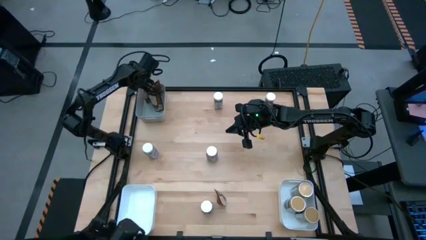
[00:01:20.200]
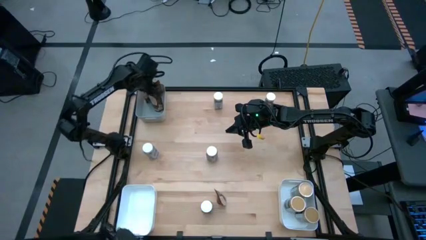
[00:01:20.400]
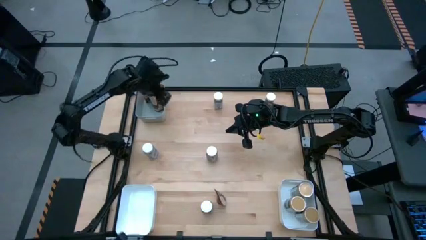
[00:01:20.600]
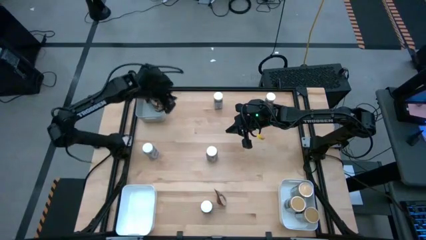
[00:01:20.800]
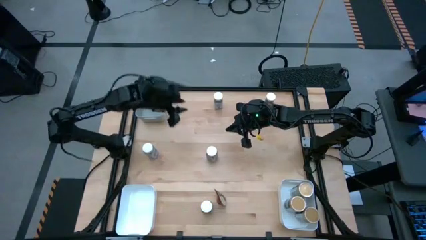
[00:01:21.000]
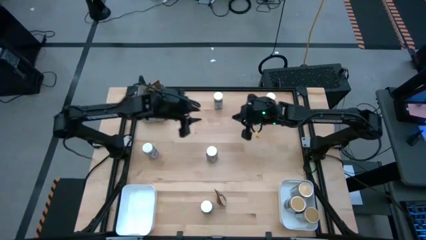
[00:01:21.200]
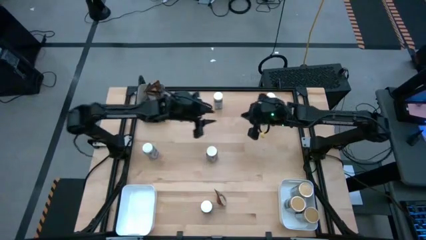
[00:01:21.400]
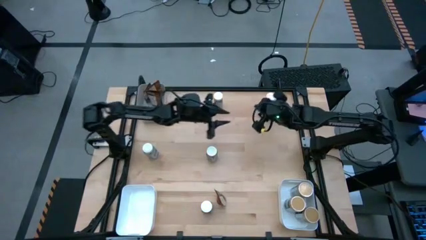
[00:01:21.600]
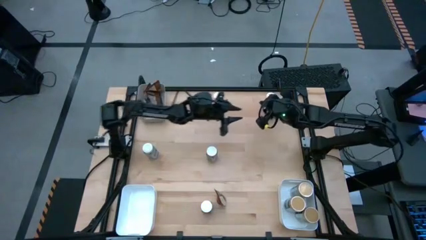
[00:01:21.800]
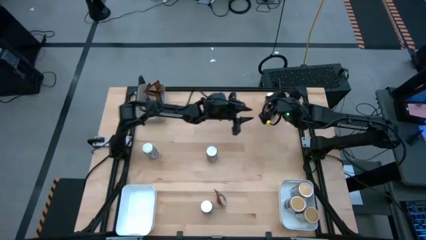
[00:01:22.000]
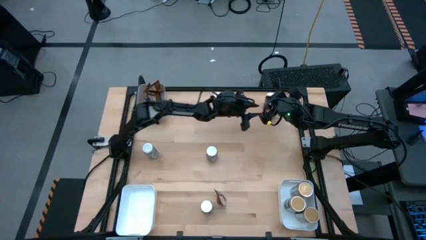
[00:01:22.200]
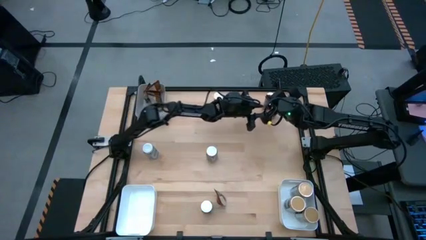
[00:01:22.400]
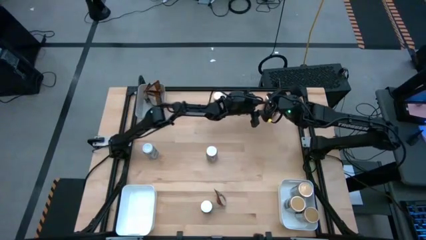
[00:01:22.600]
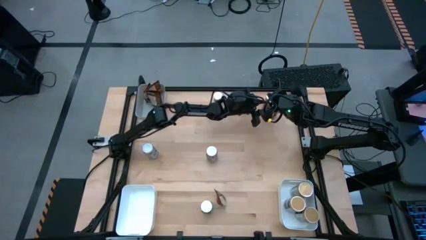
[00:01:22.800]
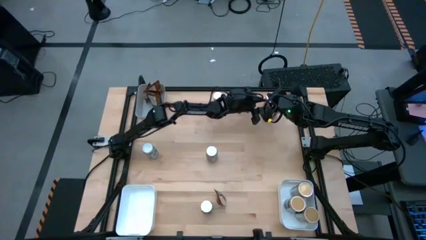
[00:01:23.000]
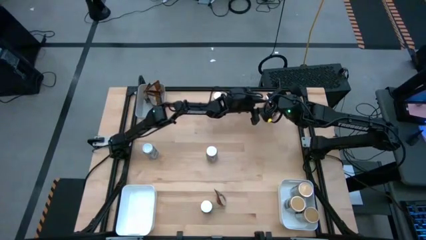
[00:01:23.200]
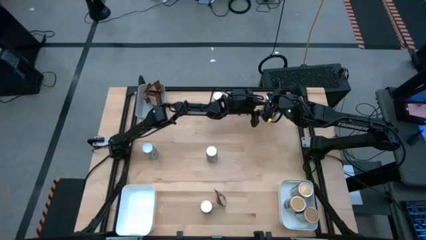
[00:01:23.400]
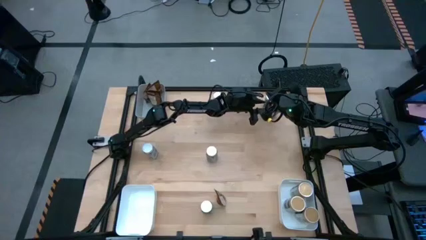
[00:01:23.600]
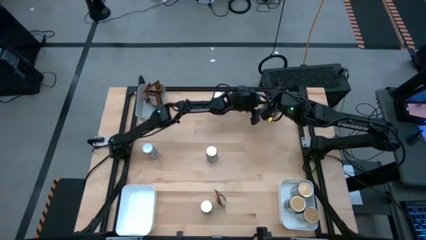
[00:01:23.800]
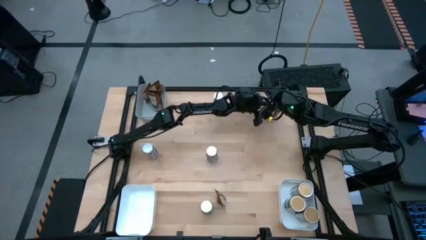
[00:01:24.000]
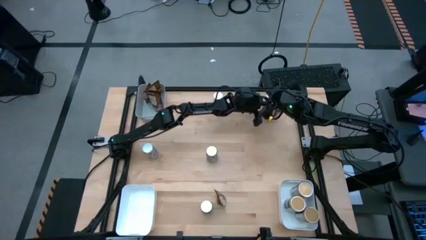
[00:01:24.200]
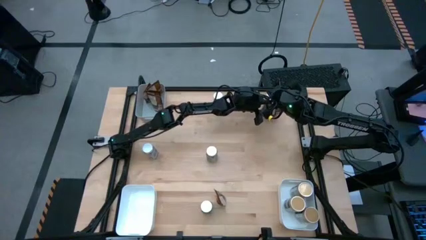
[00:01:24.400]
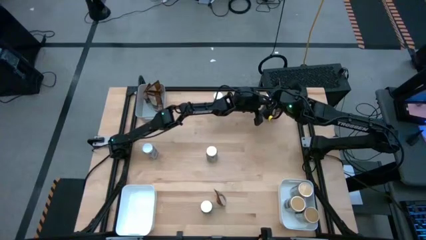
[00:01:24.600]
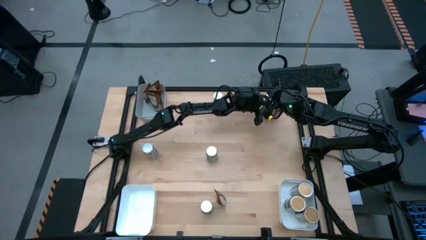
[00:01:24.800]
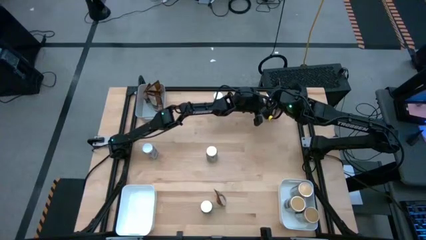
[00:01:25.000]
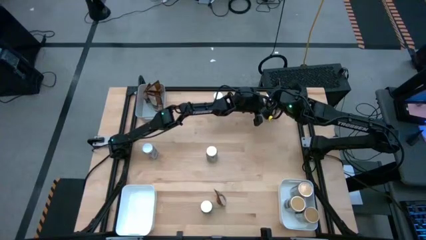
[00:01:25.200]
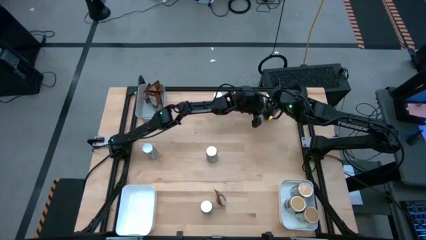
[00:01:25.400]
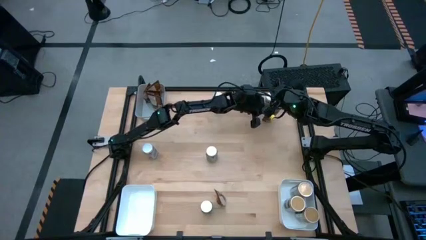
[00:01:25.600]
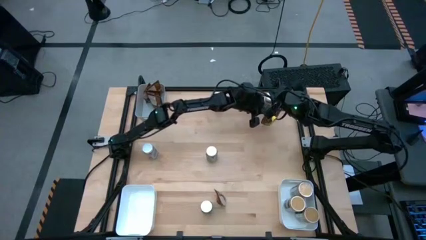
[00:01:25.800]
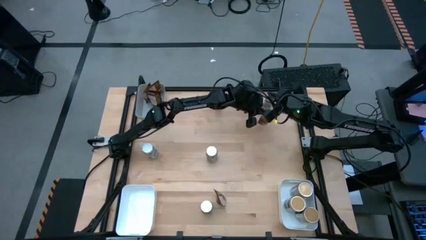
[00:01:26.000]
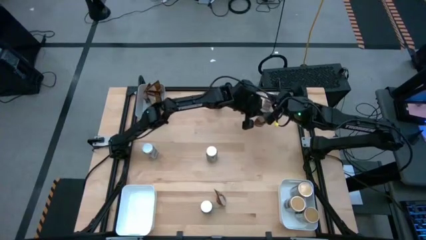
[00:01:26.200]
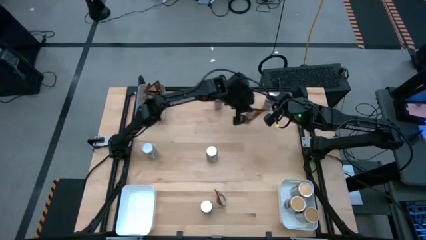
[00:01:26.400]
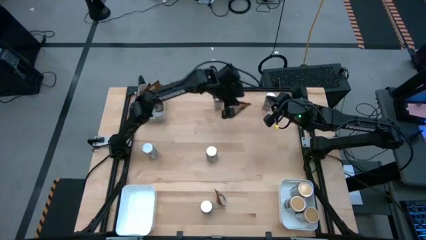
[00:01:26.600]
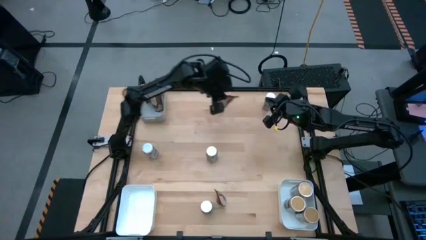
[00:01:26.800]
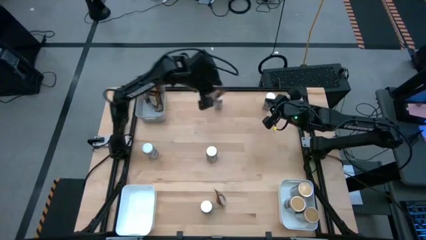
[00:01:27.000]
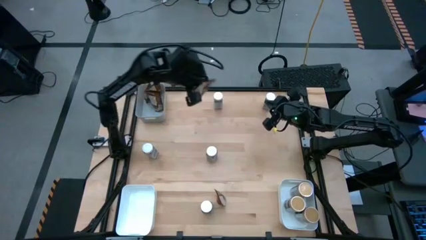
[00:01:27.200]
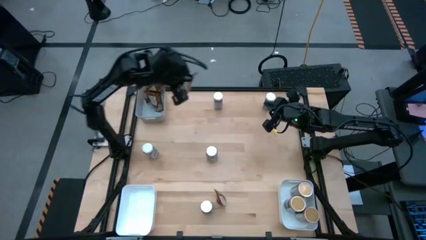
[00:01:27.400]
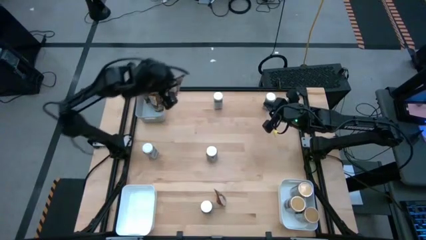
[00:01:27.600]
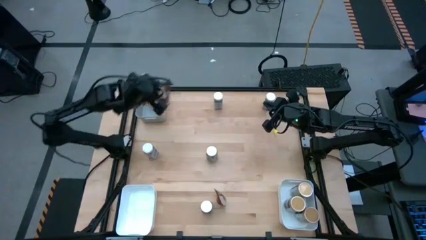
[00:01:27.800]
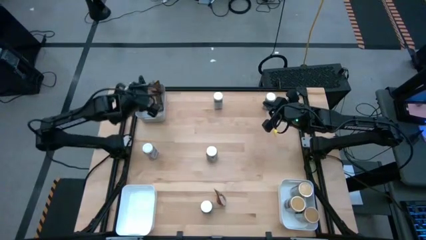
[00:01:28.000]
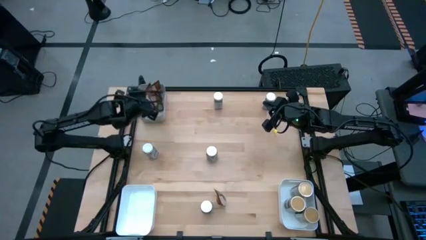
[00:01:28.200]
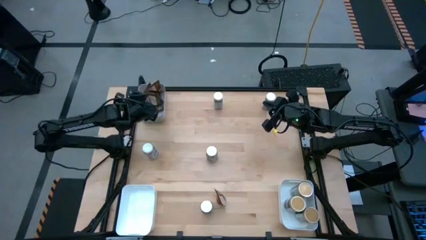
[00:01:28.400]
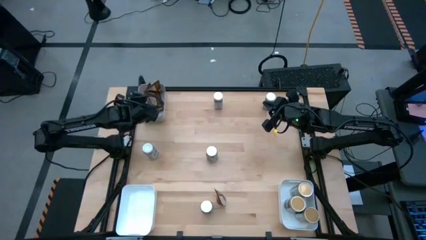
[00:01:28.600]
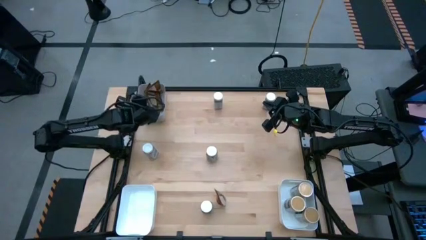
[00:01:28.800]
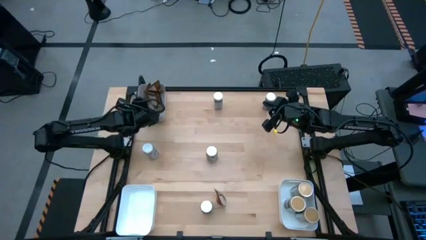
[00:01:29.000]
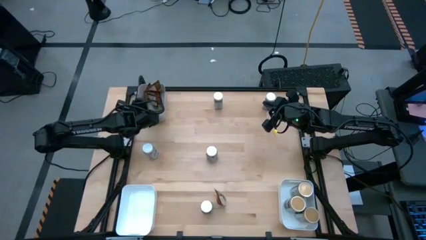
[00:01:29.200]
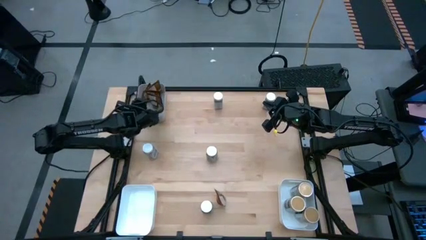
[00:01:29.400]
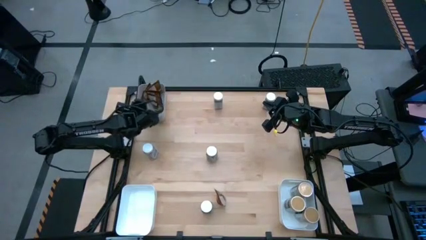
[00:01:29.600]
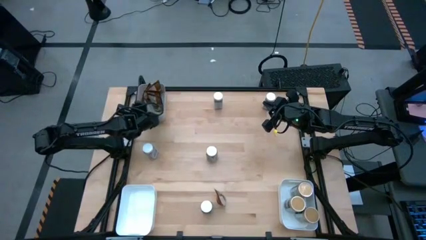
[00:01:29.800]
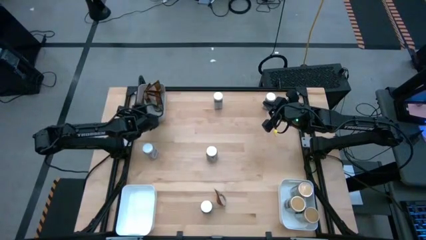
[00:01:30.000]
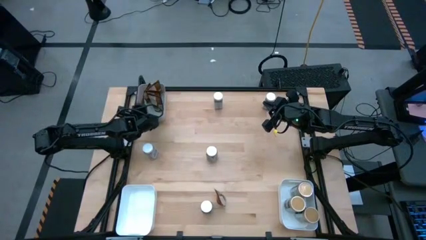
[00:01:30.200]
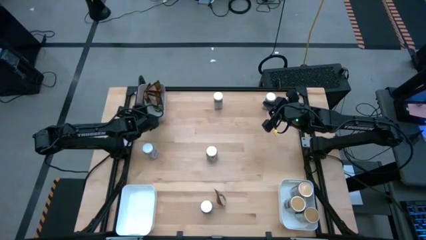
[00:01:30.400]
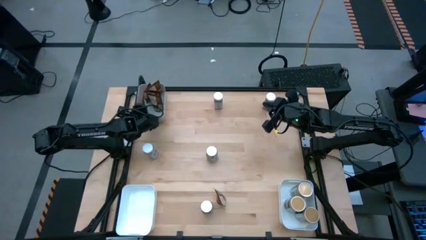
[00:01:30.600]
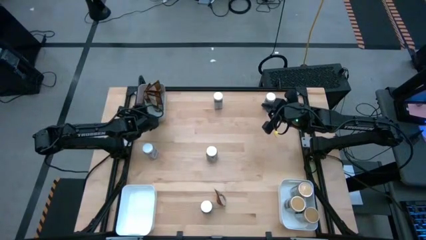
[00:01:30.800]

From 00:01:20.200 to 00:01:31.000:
Task: Sort spices by type
Put the brown seasoning bag into the top left white bin
